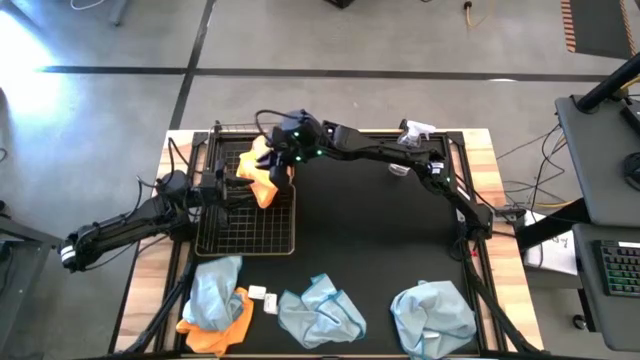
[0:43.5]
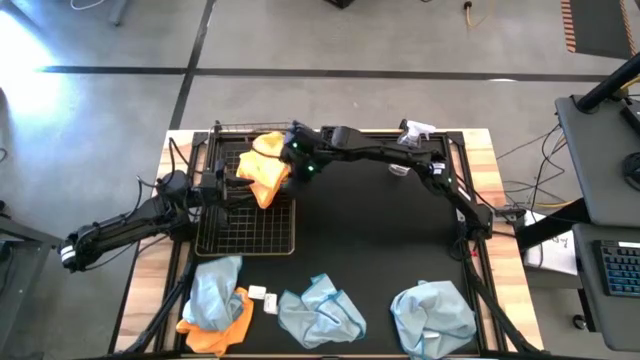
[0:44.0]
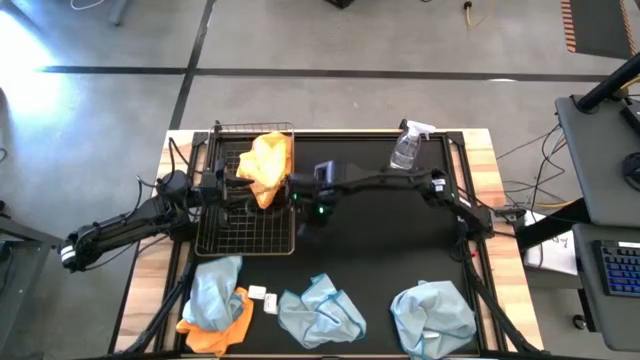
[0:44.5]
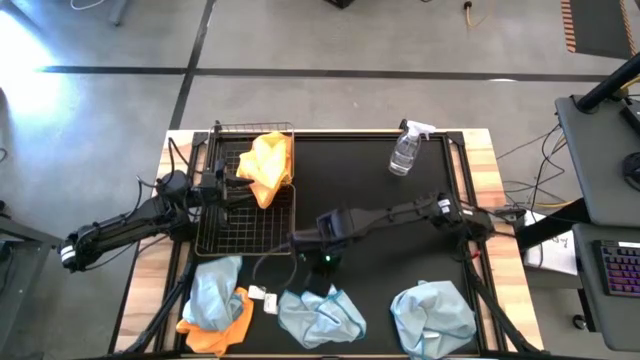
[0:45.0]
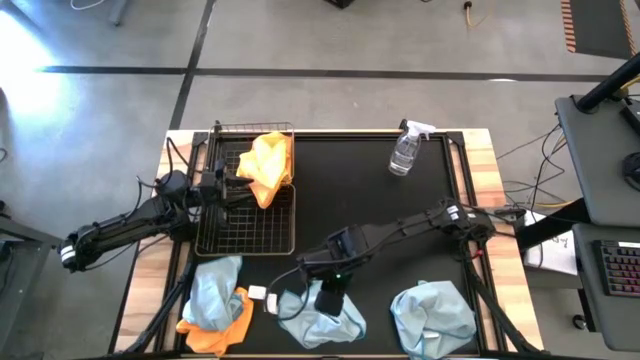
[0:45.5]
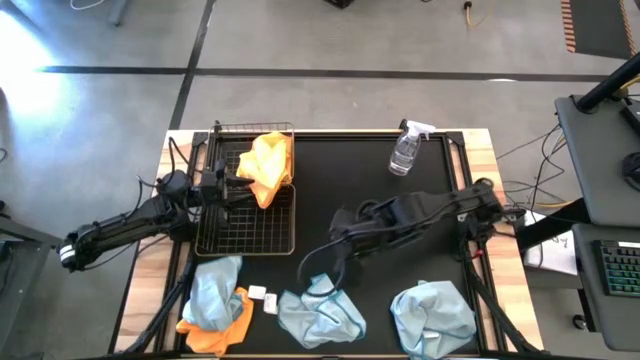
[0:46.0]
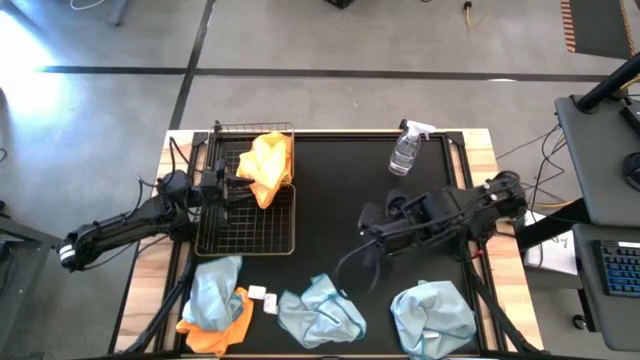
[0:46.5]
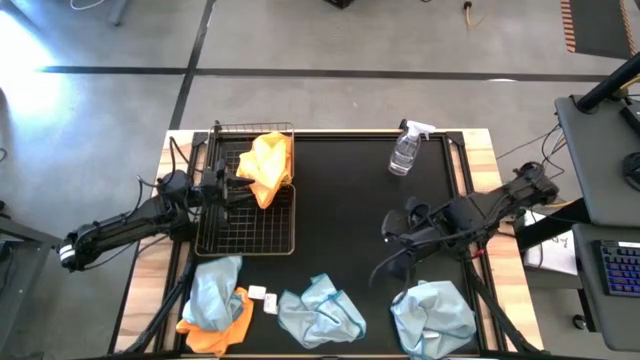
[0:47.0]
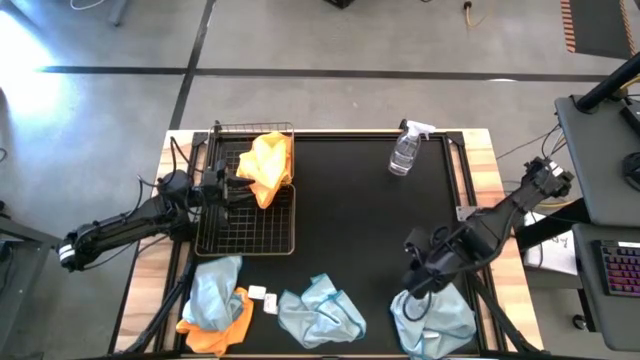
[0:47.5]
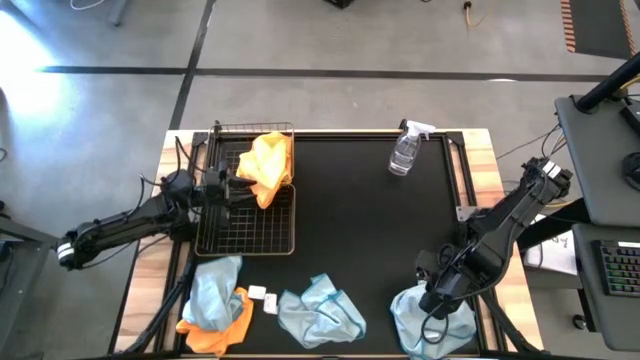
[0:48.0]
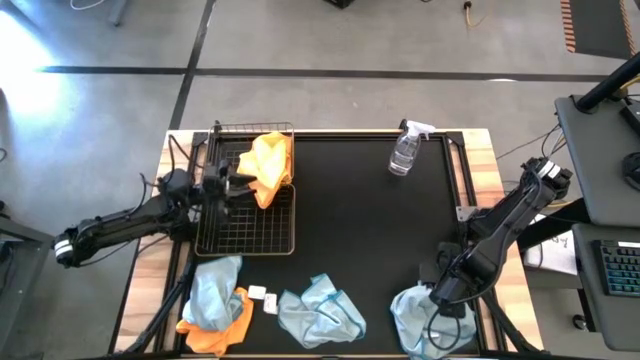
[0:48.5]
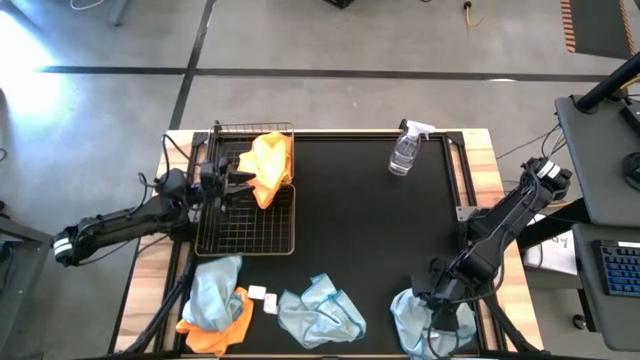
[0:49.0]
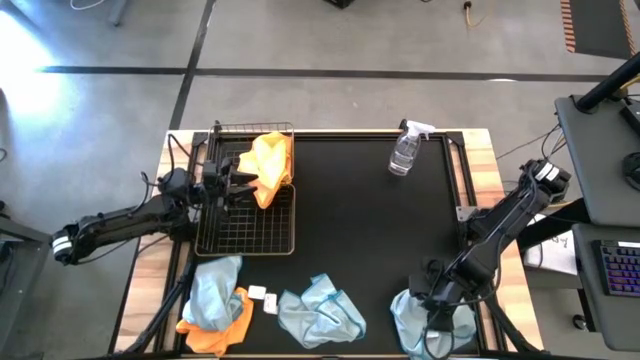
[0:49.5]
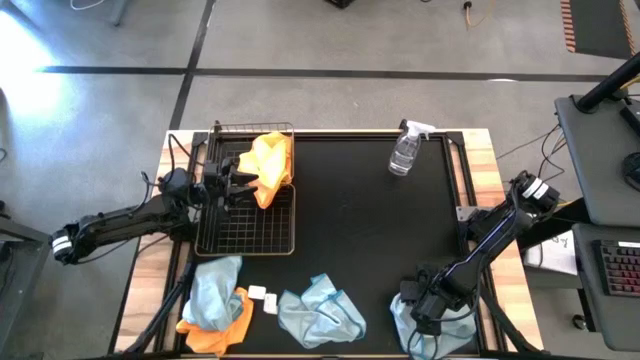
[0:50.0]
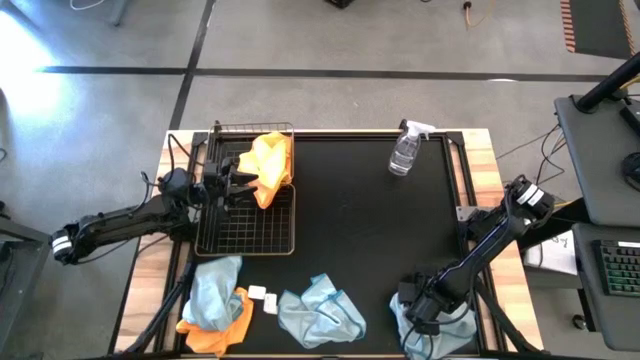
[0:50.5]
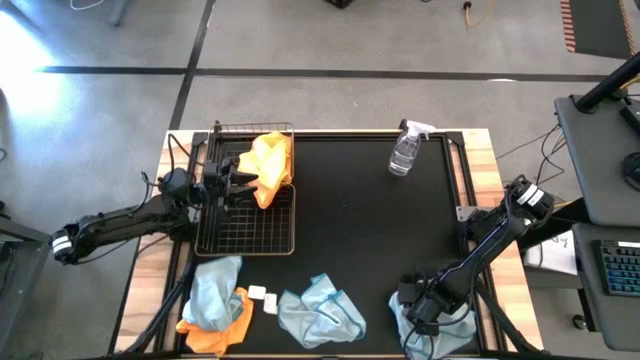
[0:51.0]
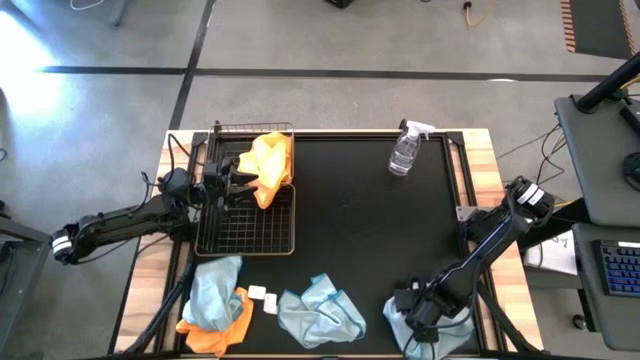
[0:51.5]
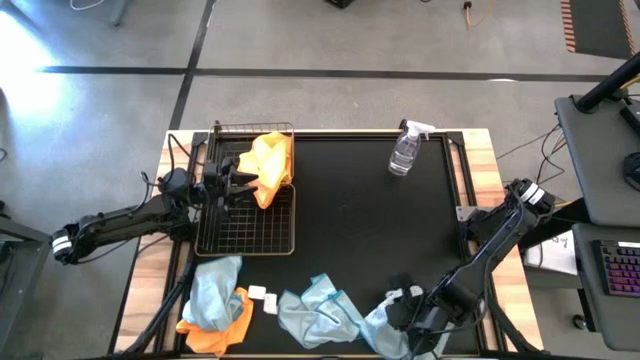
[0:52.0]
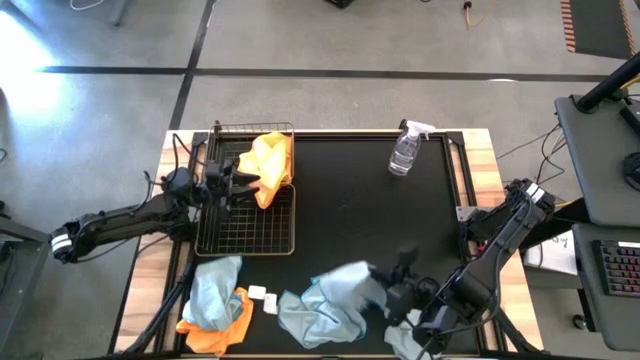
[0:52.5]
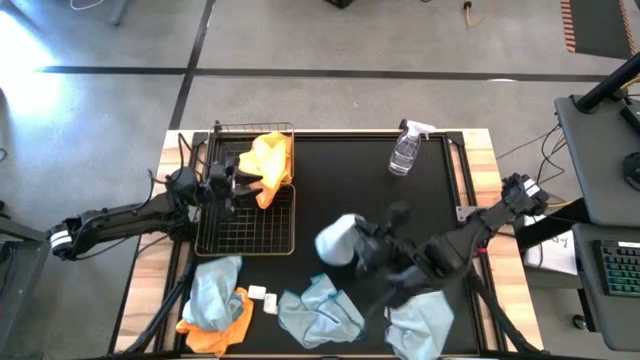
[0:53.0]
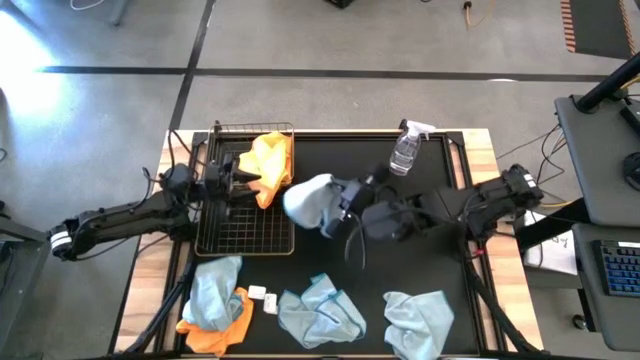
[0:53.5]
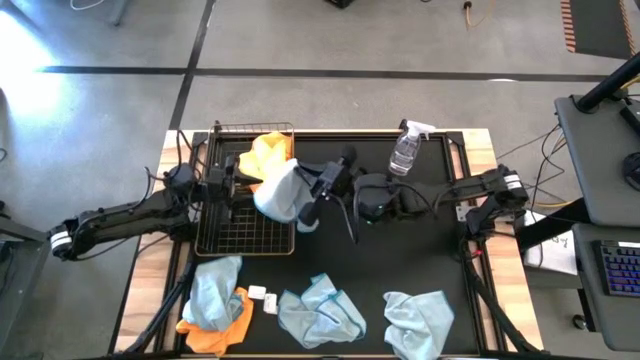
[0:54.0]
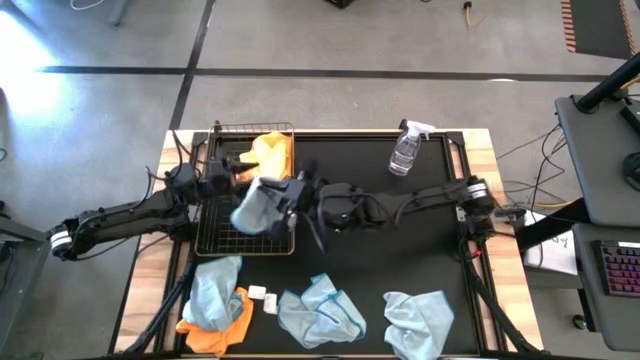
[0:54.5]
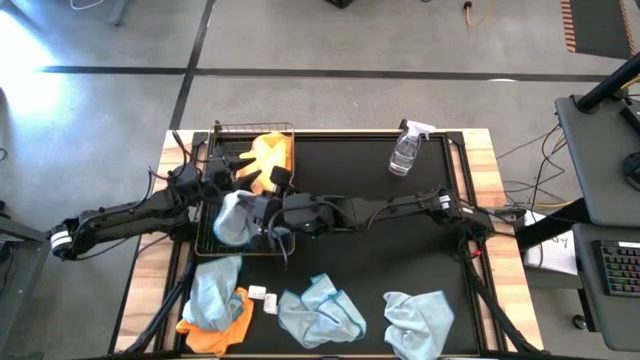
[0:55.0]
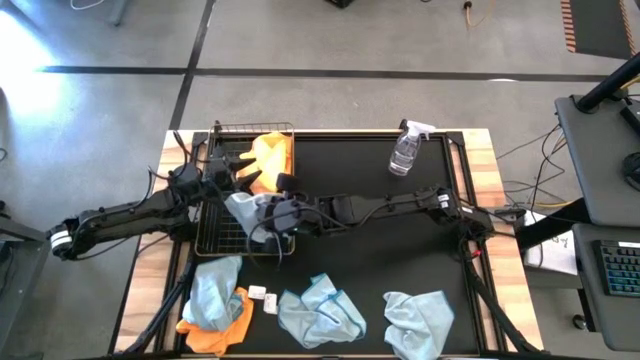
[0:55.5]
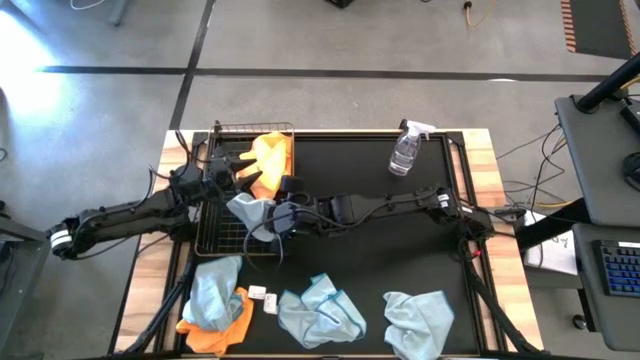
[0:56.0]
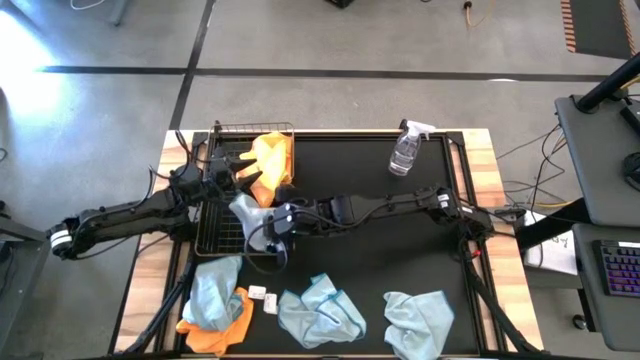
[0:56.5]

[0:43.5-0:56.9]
Task: Sort microfiber towel by color & place in baskets
Put the right blue microfiber towel into the bottom wire basket

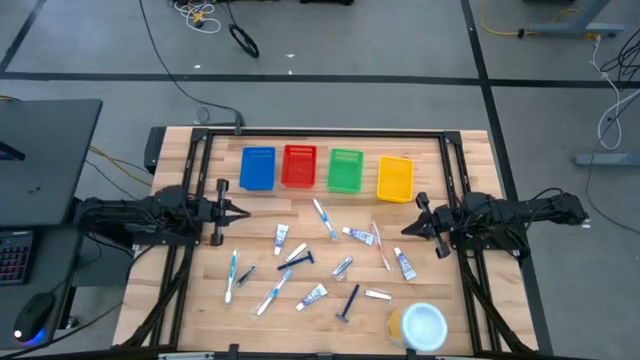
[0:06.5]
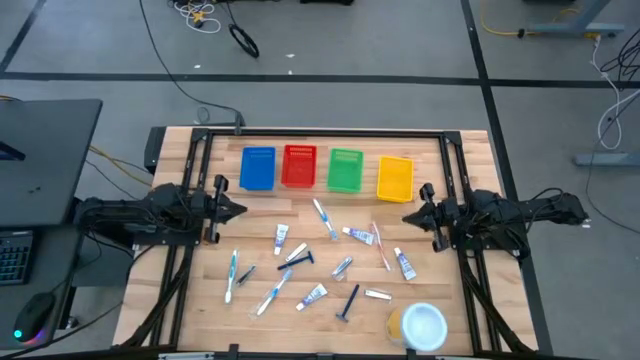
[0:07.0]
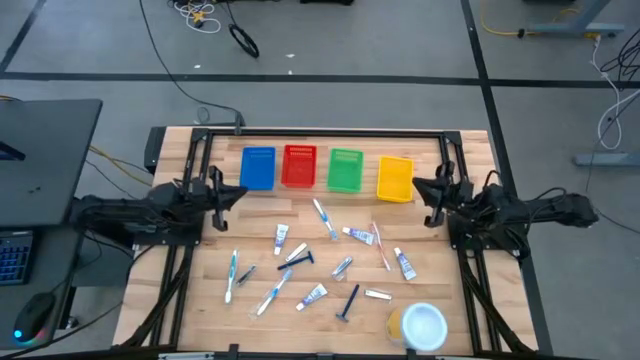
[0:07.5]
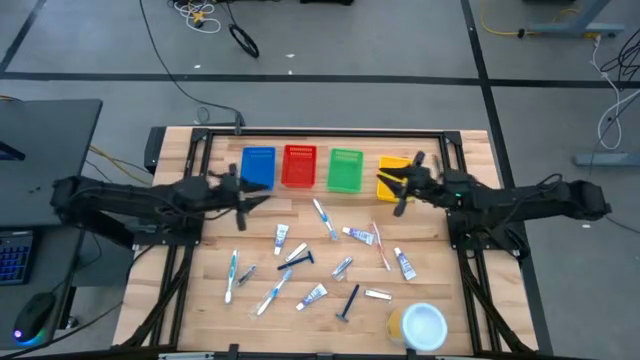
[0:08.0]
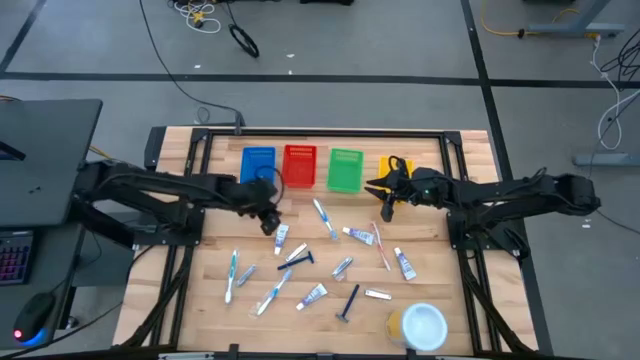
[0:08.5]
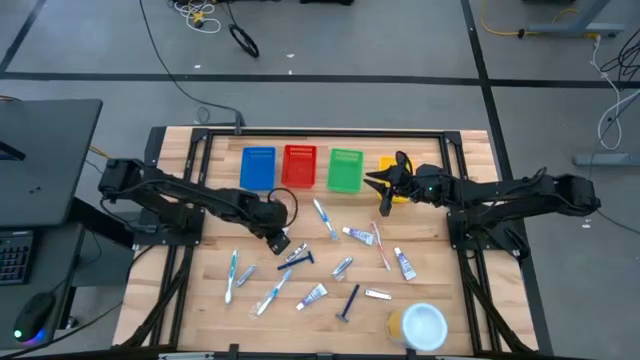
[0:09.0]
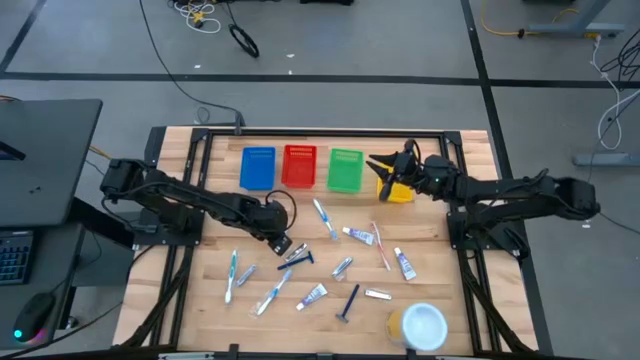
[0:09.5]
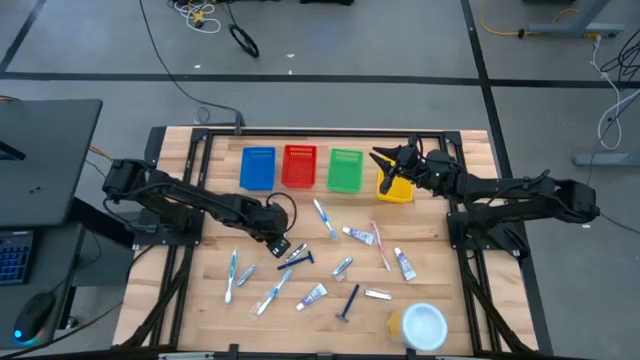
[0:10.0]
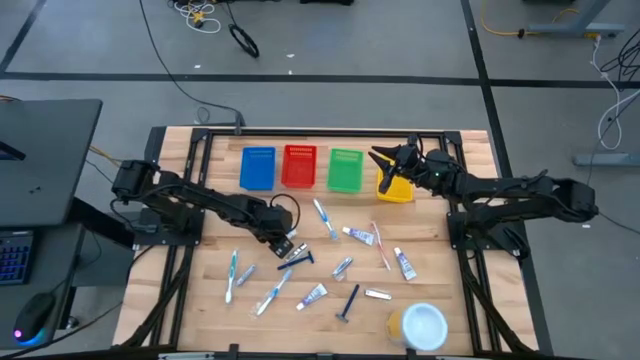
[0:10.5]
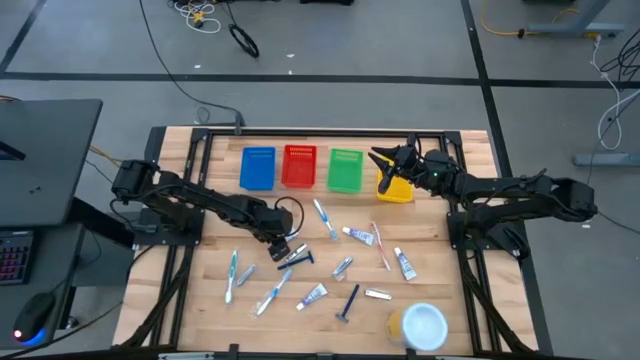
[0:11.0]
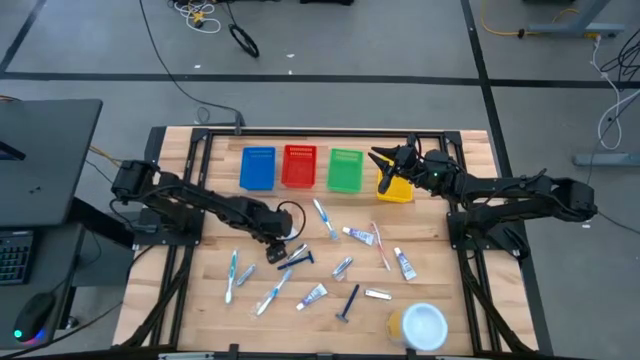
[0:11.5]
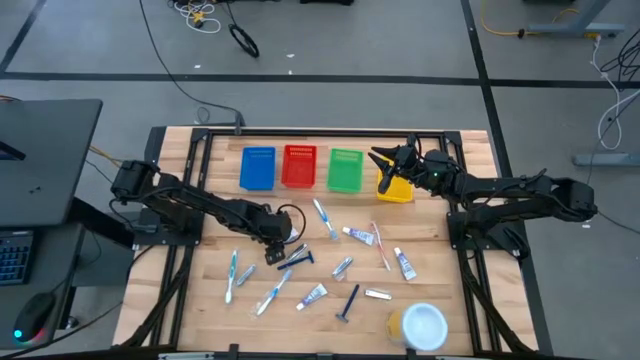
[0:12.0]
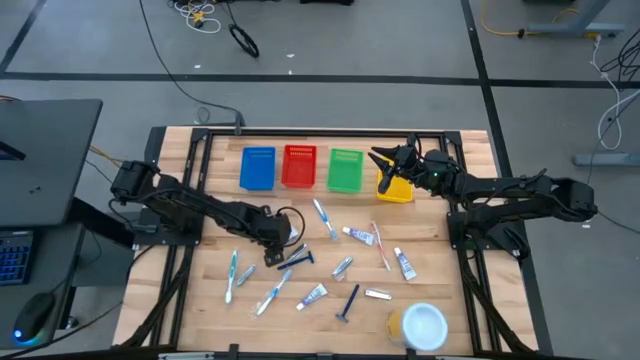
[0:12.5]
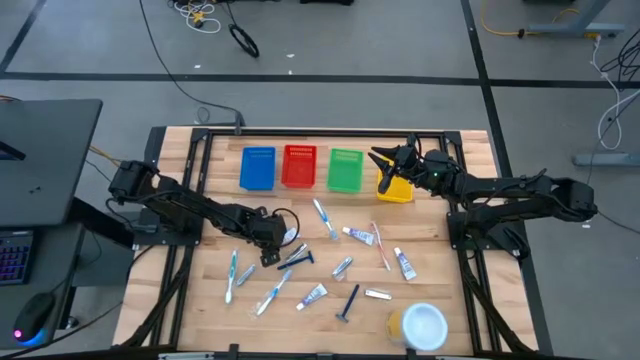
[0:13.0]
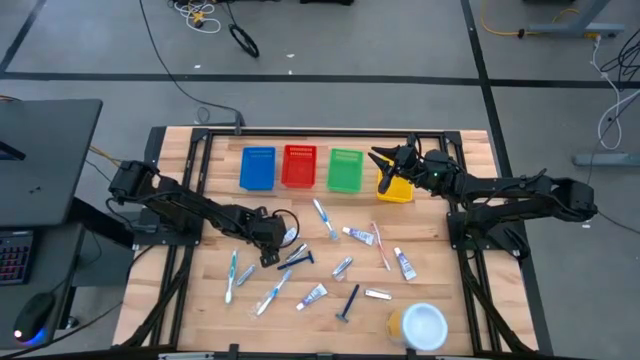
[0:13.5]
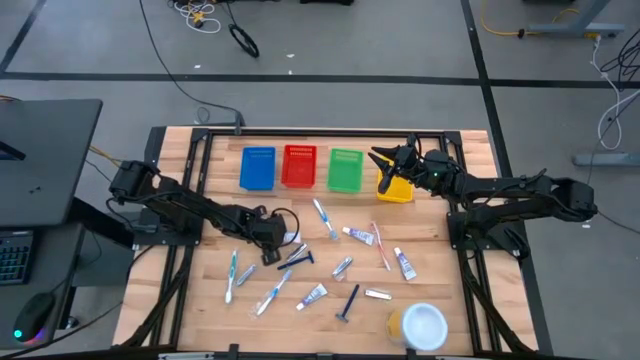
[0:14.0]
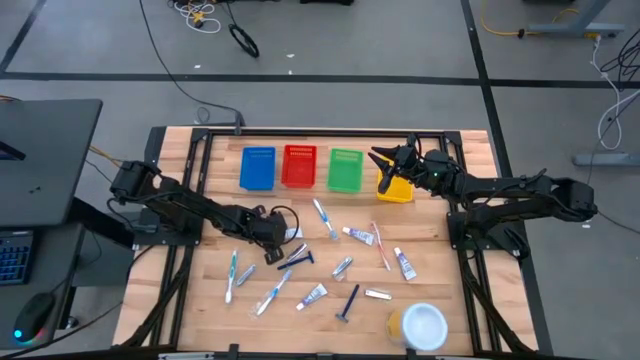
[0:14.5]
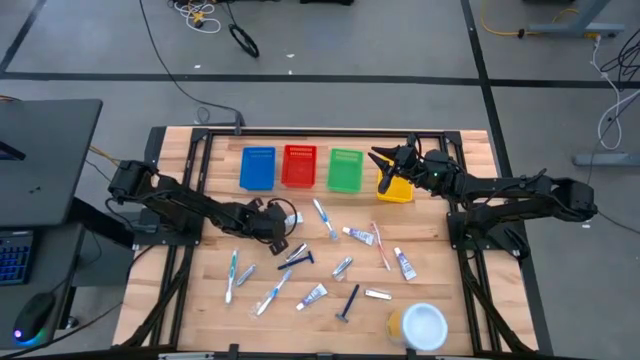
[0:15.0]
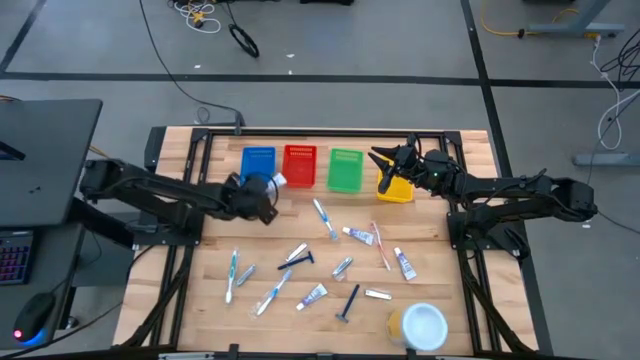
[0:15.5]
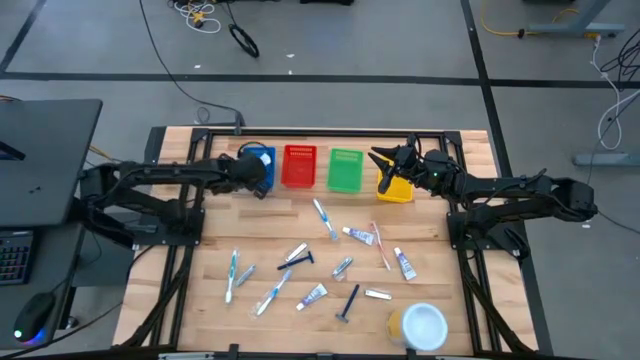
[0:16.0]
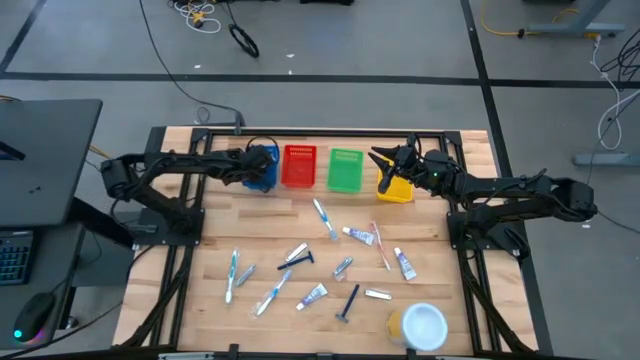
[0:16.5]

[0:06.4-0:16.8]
Task: Pick & Place Travel size toiletries
Put the white toothpaste into the blue bin
